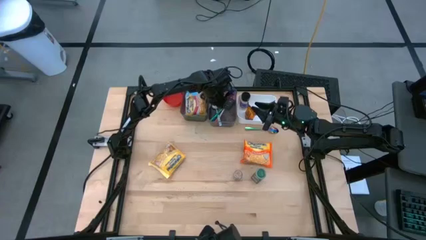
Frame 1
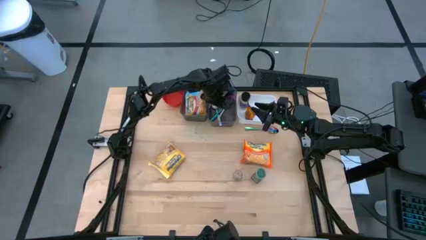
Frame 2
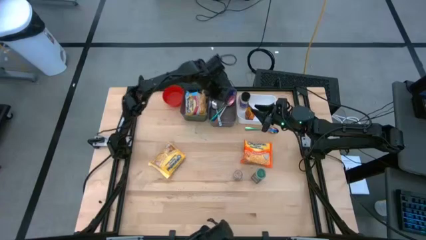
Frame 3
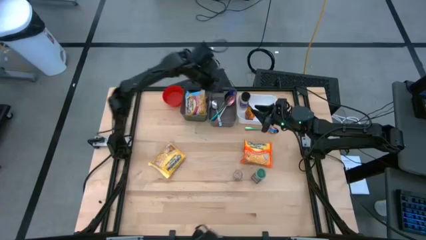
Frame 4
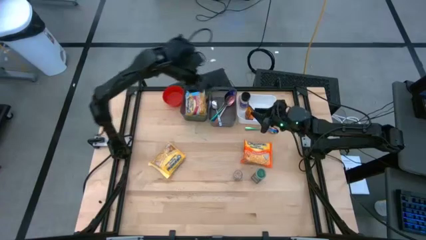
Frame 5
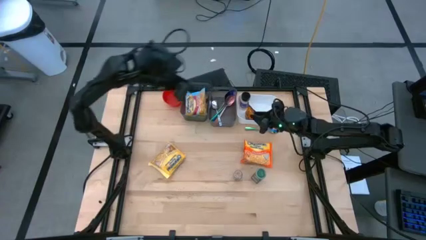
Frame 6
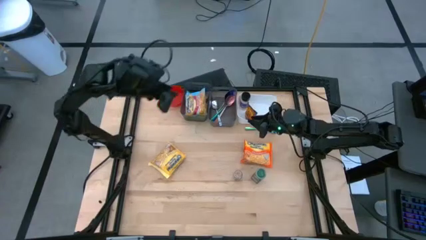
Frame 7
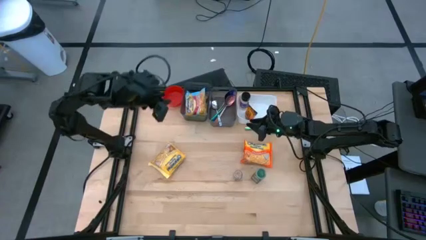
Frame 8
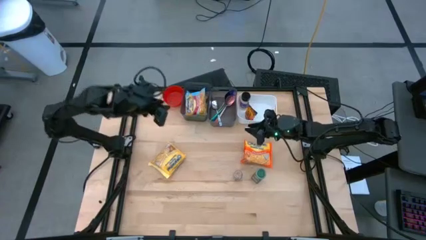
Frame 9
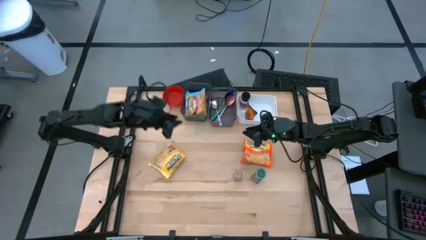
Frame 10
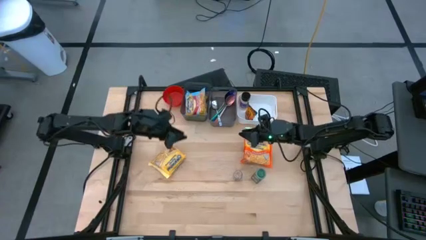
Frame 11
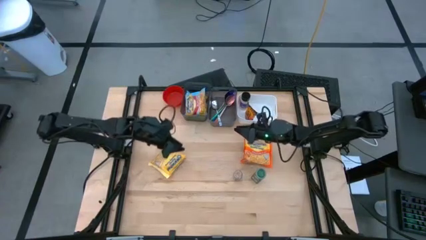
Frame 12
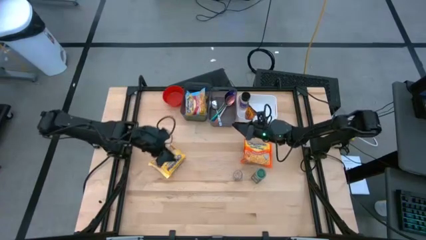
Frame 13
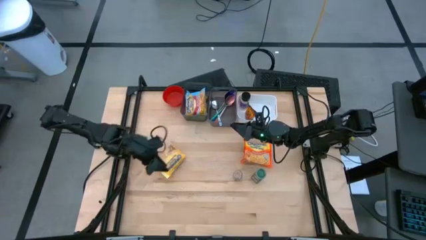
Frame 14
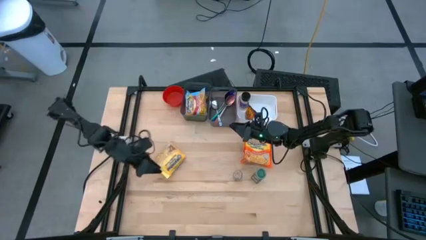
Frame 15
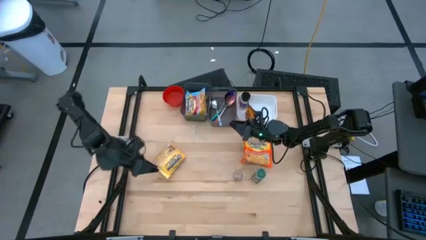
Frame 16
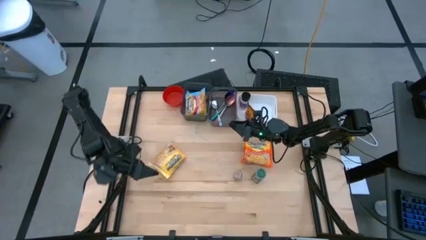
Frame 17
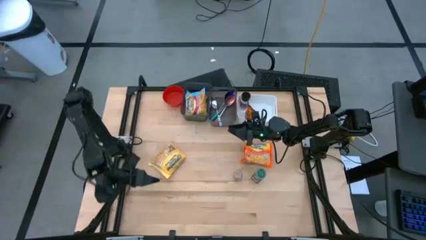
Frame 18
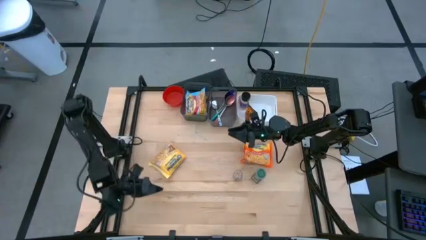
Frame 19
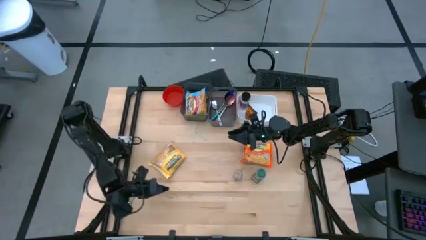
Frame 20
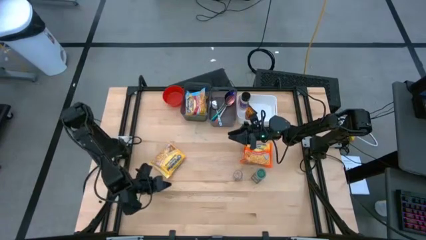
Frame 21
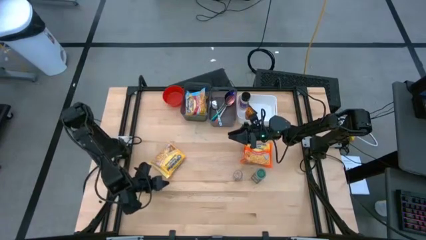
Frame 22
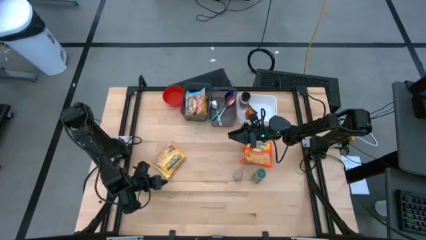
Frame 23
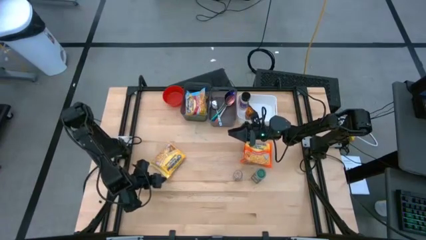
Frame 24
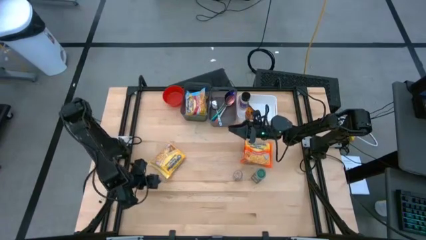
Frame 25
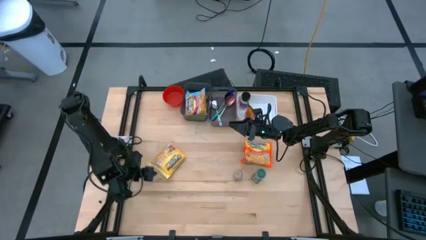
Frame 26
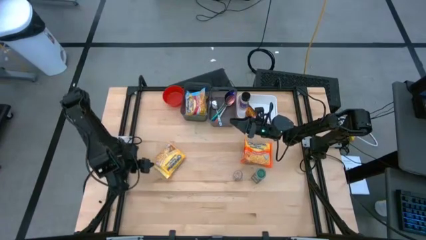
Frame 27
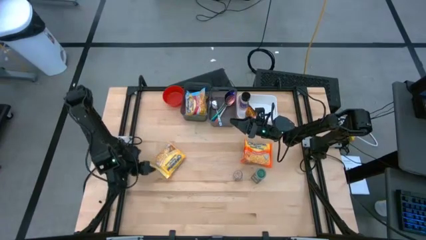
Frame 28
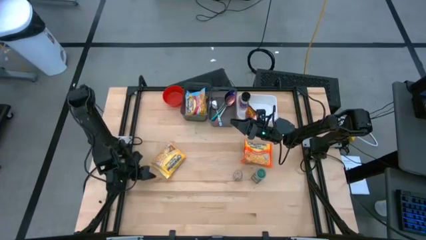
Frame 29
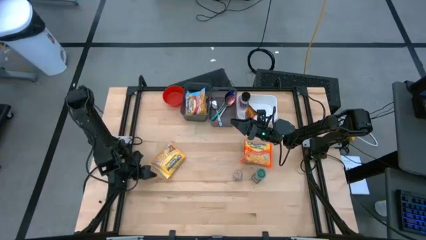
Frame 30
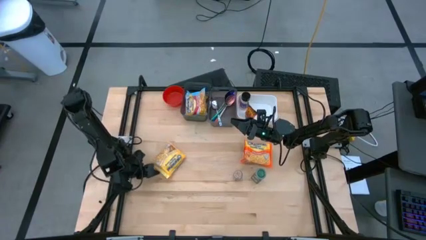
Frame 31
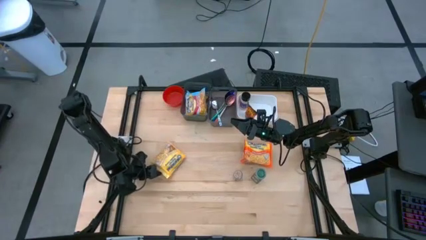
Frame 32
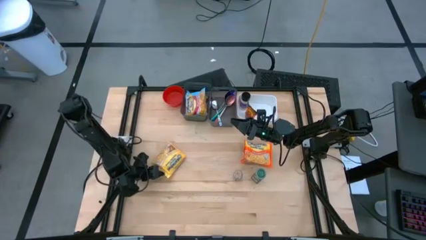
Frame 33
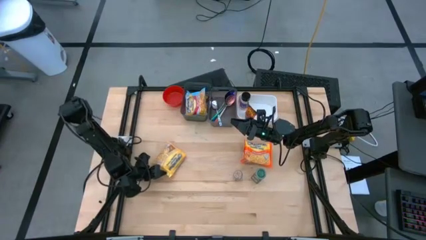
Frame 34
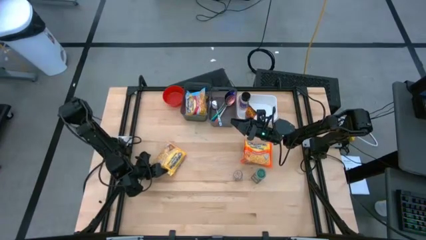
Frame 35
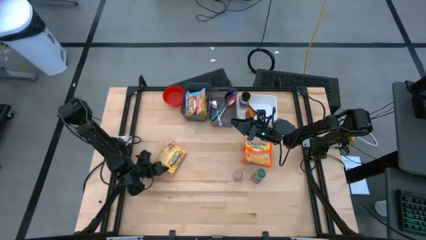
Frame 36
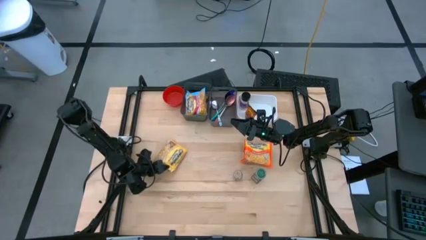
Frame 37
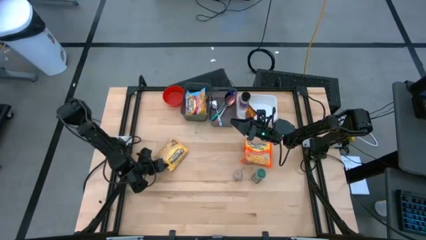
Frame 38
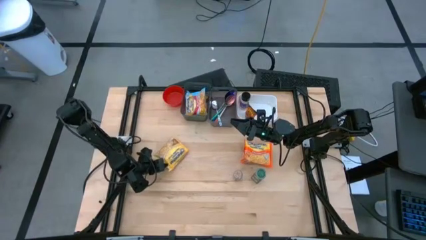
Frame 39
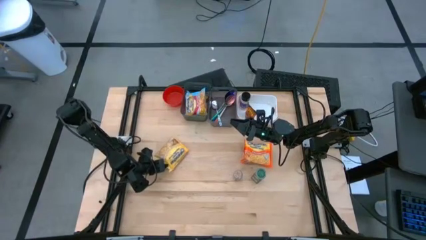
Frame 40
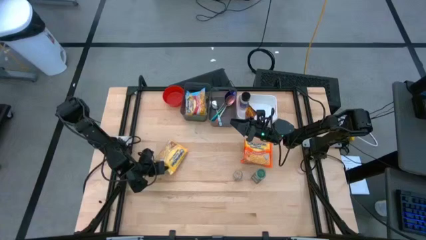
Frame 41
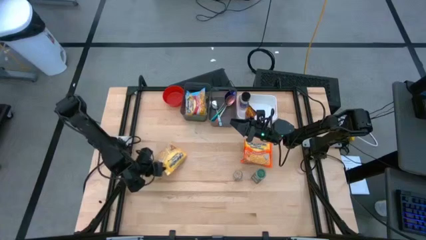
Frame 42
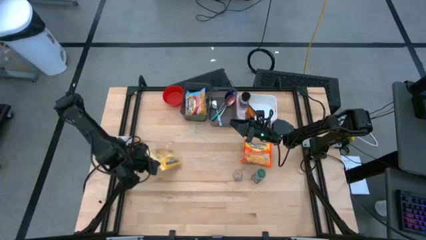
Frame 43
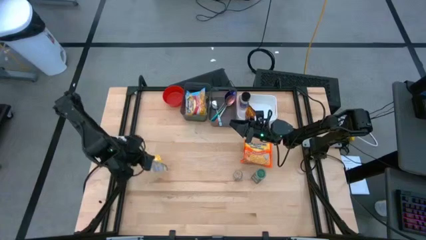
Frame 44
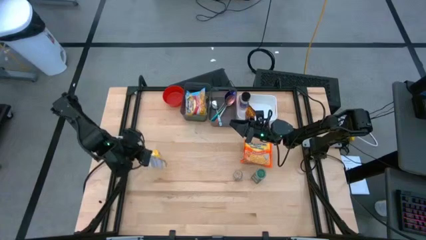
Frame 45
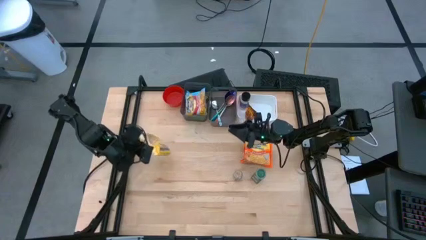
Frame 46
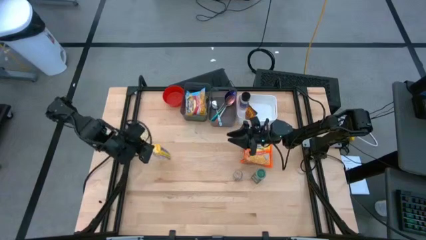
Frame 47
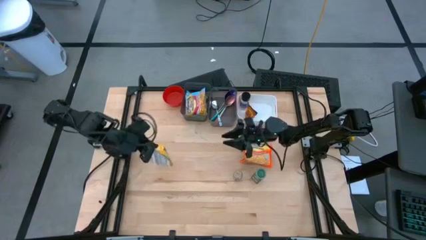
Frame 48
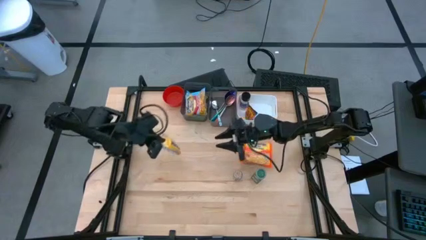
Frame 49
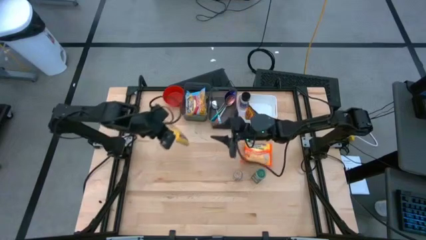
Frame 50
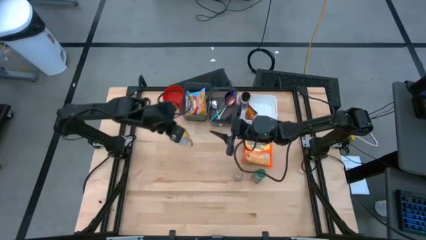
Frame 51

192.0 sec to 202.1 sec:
Task: Pick & Place Food Item
Put the yellow noodle pack into the left black bin

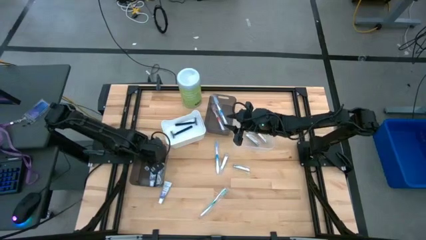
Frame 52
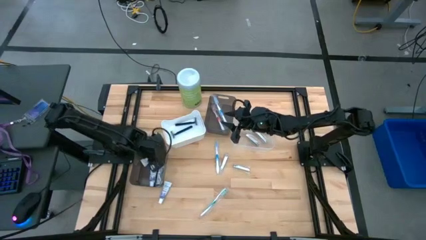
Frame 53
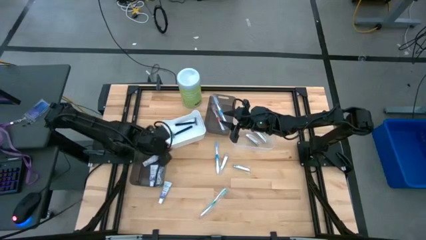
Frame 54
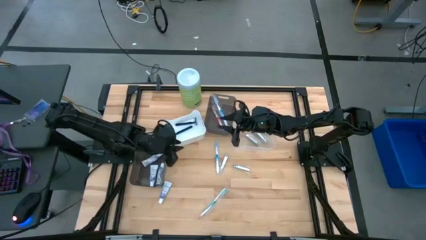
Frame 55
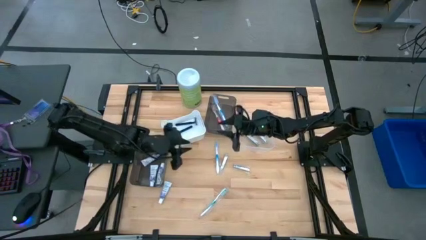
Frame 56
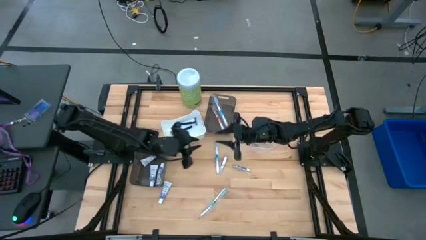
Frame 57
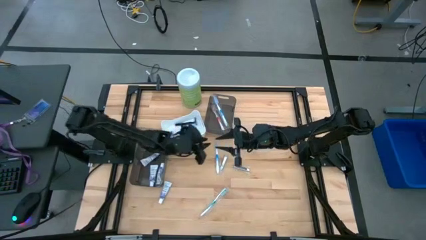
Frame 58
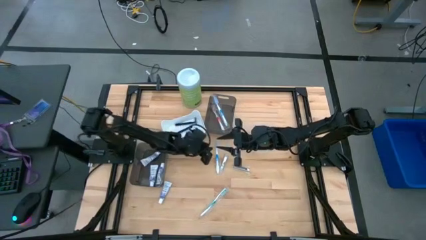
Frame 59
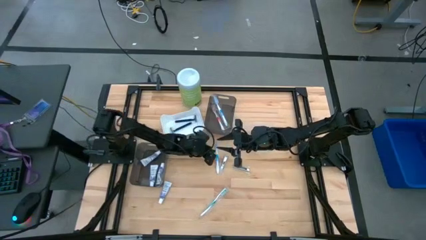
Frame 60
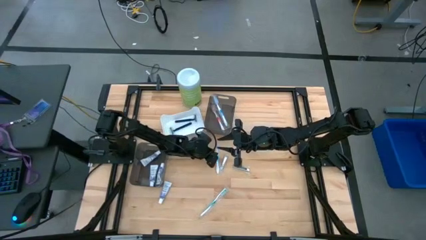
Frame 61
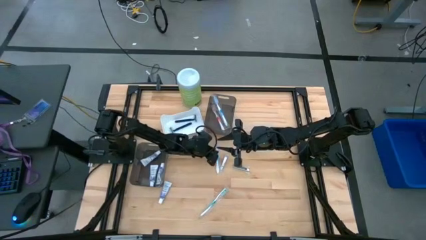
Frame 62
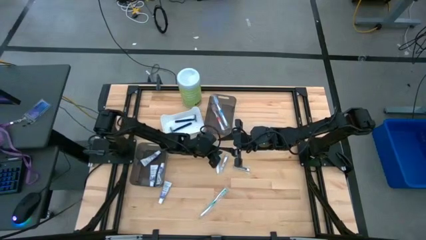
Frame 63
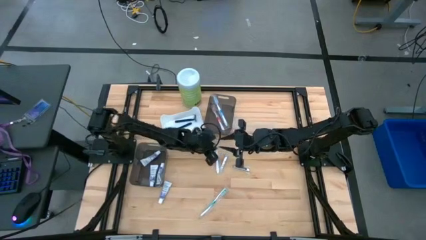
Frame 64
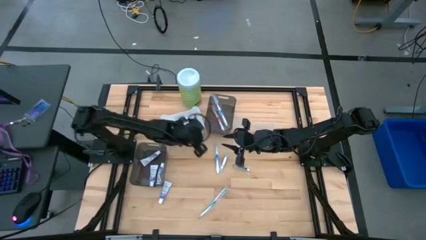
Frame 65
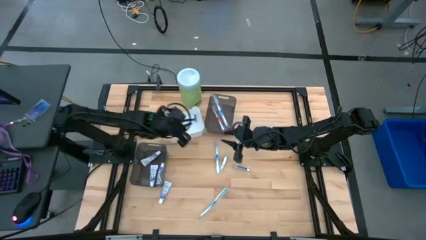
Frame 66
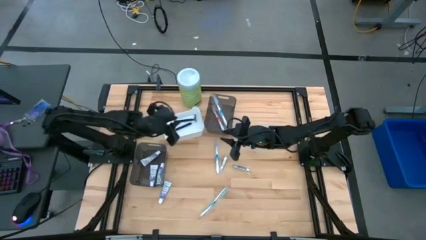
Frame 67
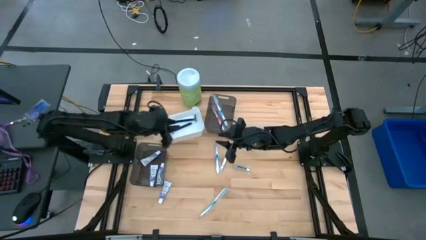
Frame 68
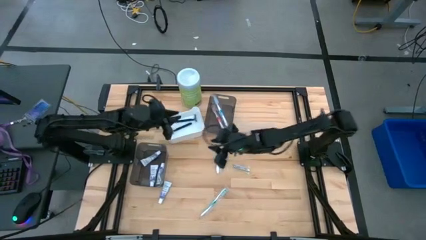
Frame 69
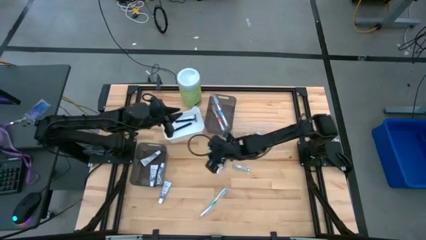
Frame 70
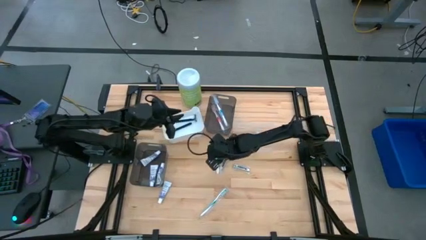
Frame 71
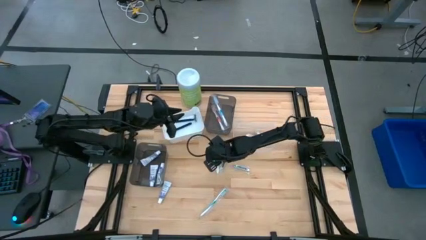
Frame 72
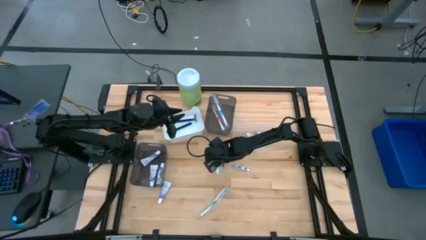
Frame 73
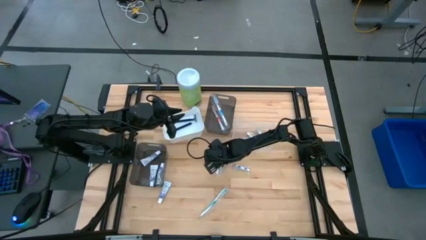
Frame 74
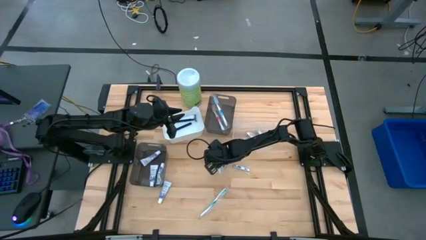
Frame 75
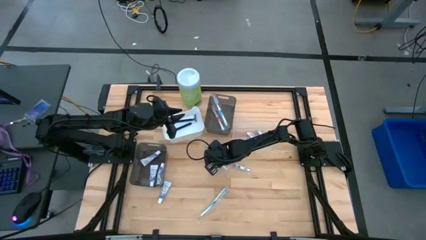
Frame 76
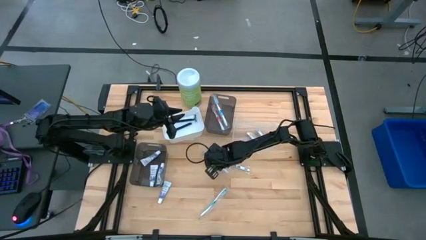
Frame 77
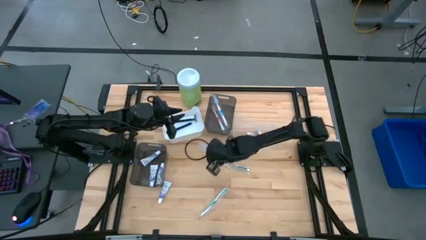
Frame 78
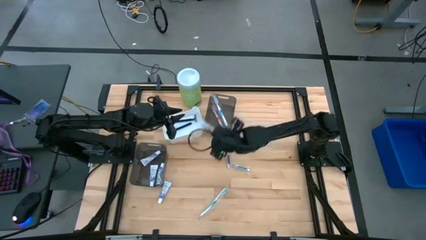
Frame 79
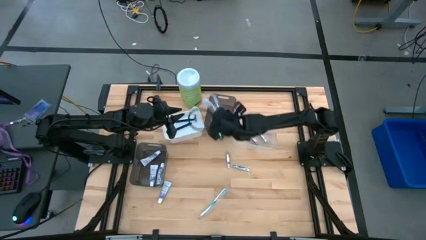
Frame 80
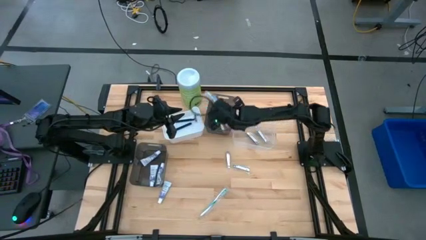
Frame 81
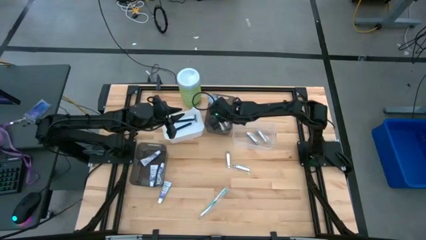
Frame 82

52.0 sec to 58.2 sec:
Task: Pick & Place Travel size toiletries
Put the blue toothbrush into the top black bin

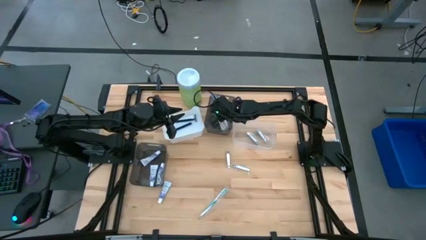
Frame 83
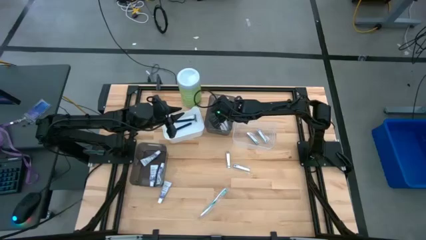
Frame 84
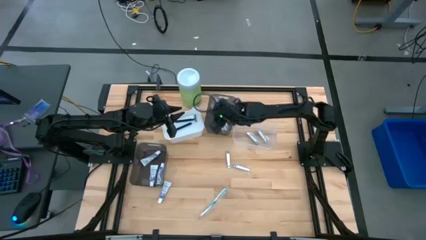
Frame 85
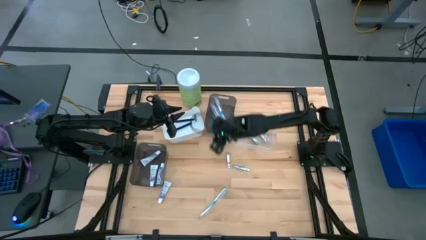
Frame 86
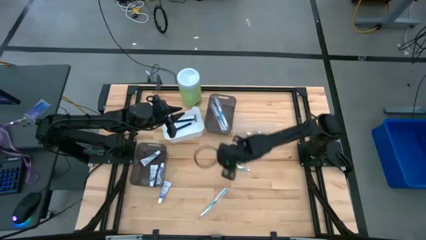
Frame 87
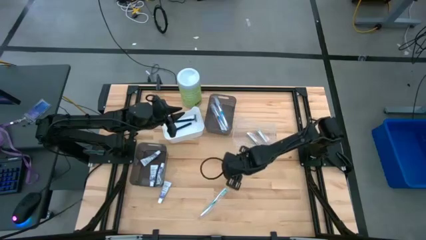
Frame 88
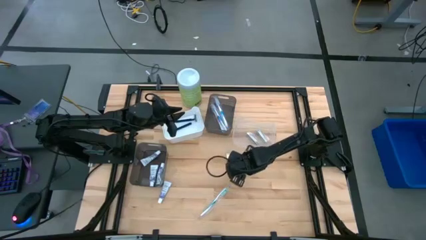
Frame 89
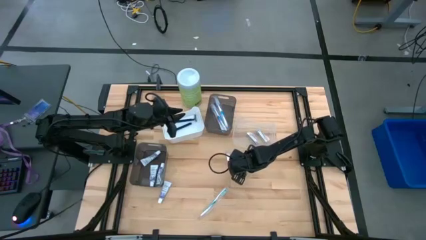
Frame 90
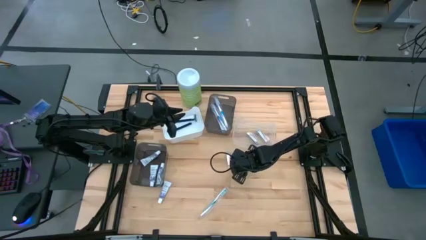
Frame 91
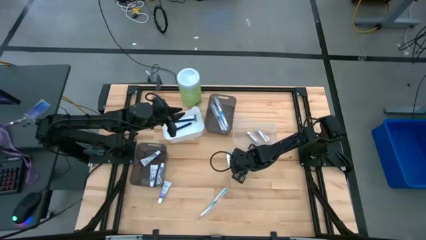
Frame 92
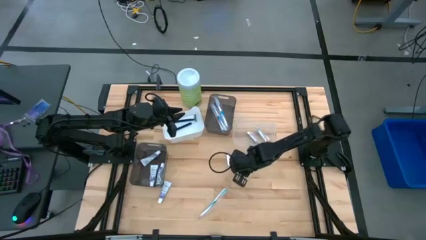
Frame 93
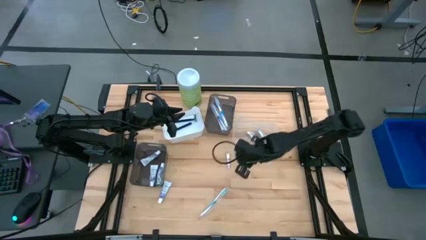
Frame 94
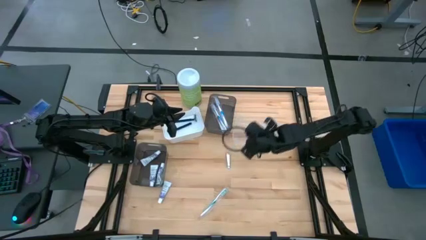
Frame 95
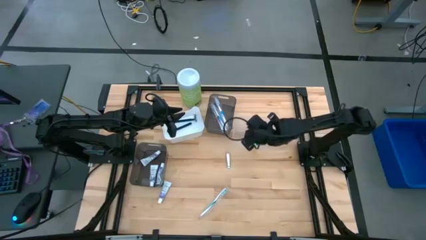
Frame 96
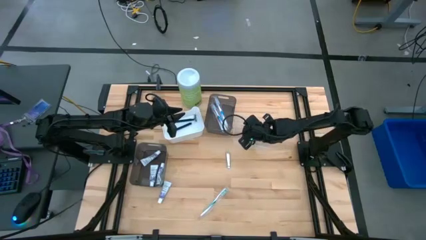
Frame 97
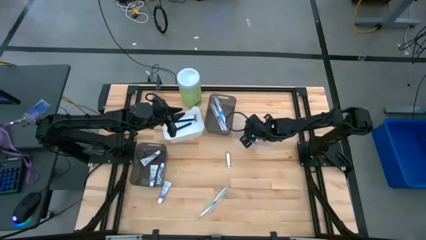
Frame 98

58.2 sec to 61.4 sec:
Put the silver nail cutter into the transparent bin
